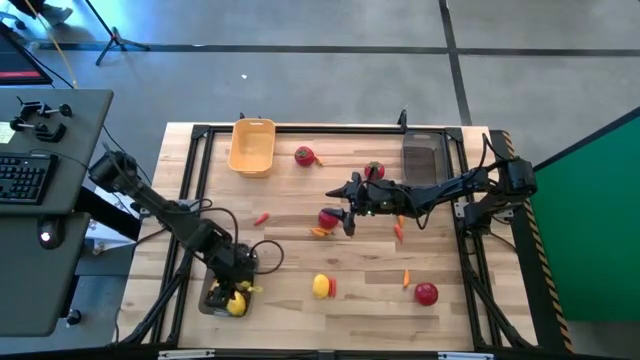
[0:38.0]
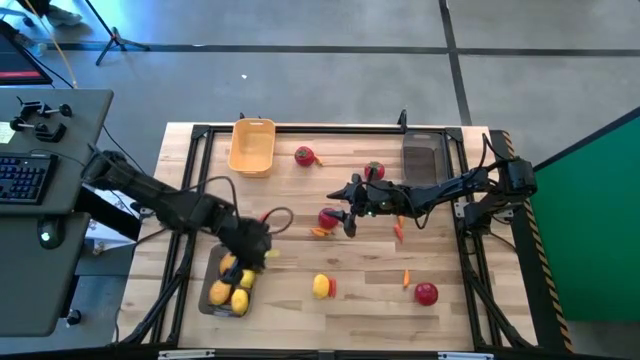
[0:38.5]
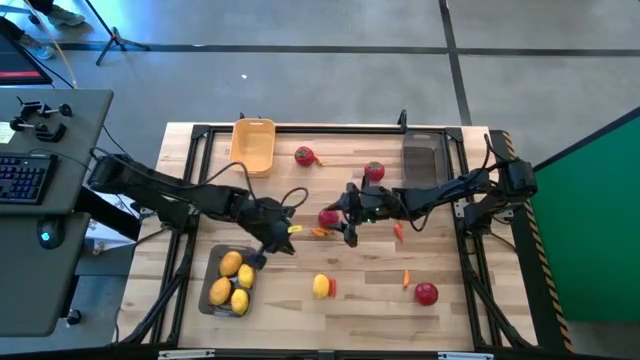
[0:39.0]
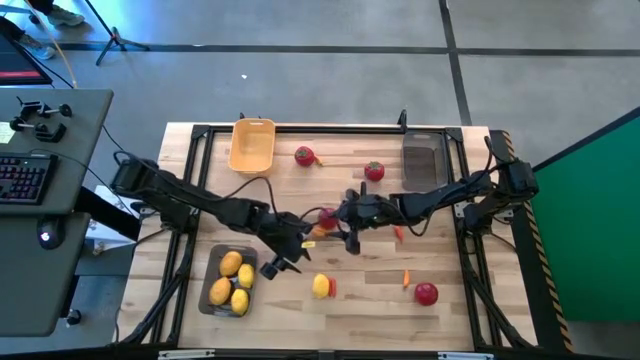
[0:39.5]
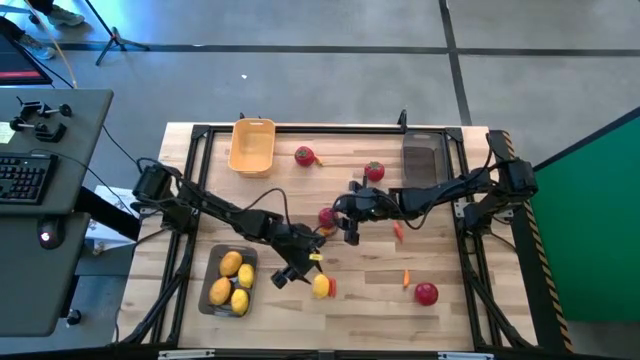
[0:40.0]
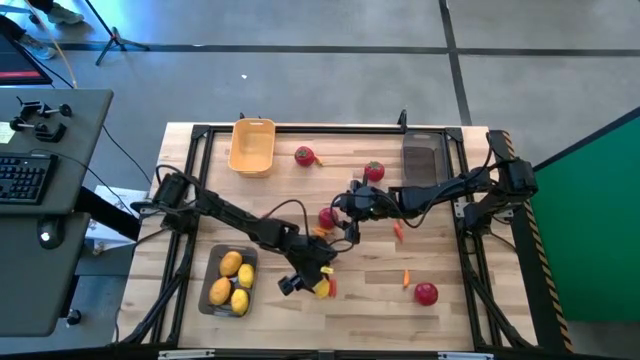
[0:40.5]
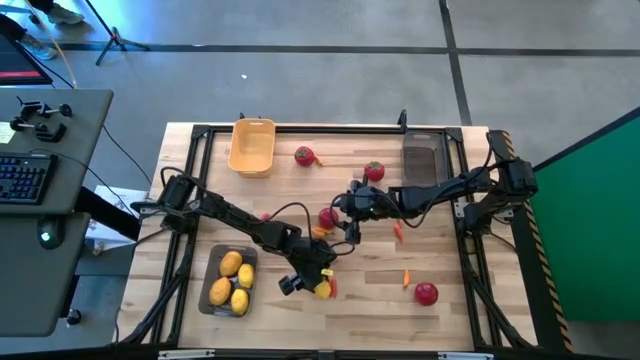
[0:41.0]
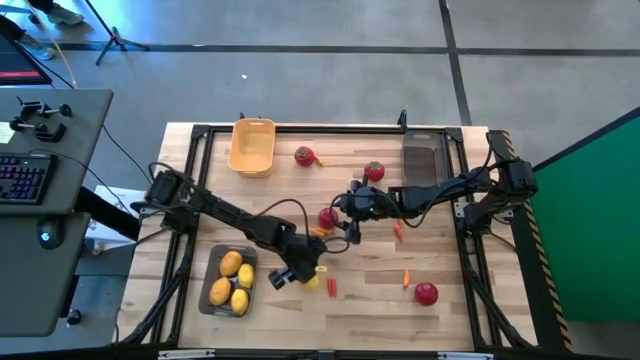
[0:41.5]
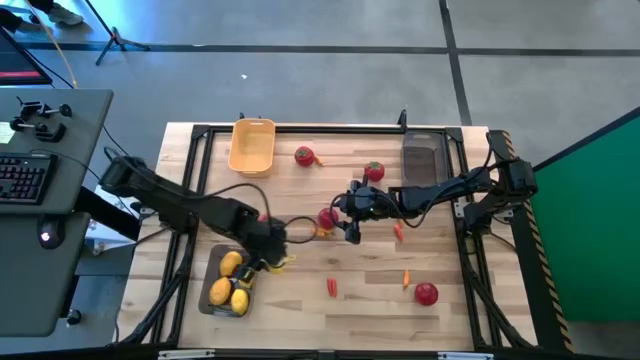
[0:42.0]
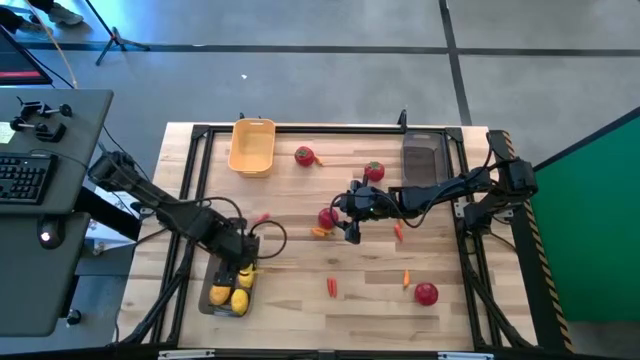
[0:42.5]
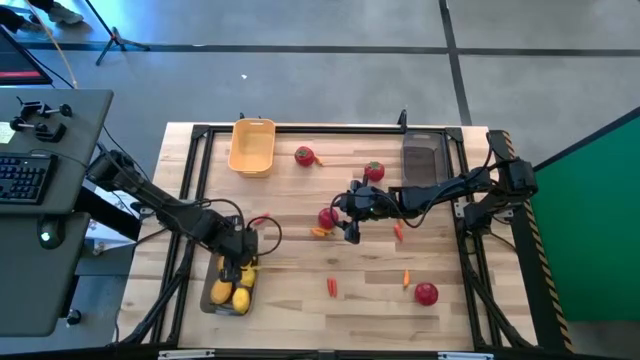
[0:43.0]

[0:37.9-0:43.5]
Task: Sort produce into baskets
Put the lemon into the bottom gray bin

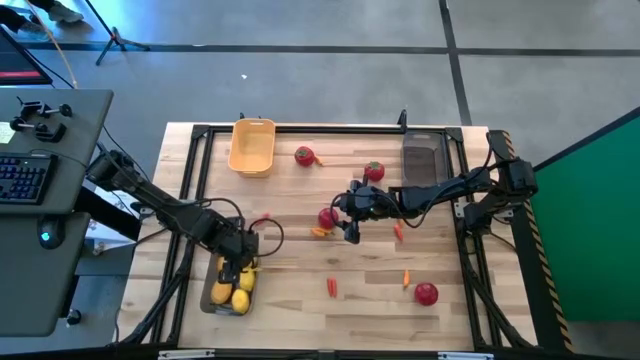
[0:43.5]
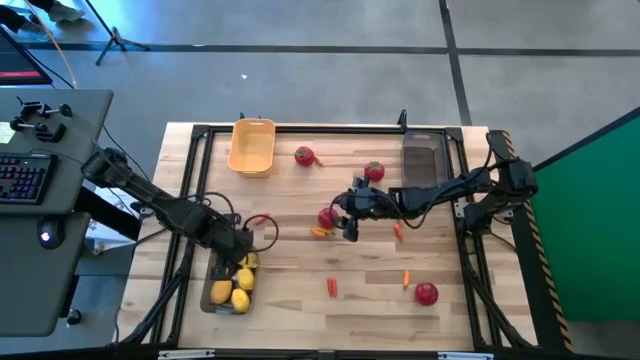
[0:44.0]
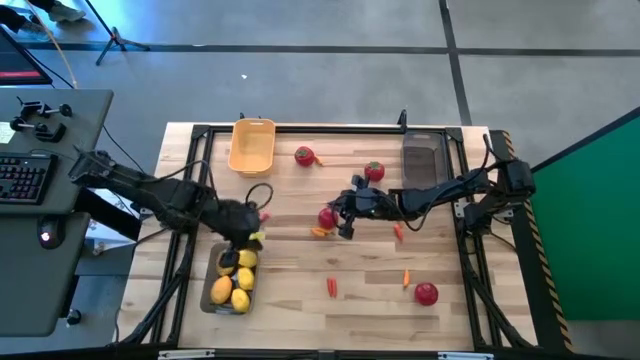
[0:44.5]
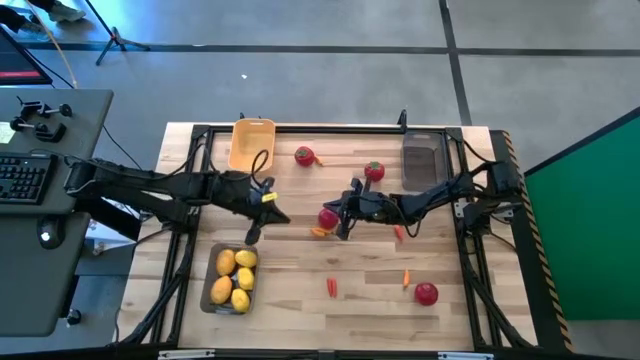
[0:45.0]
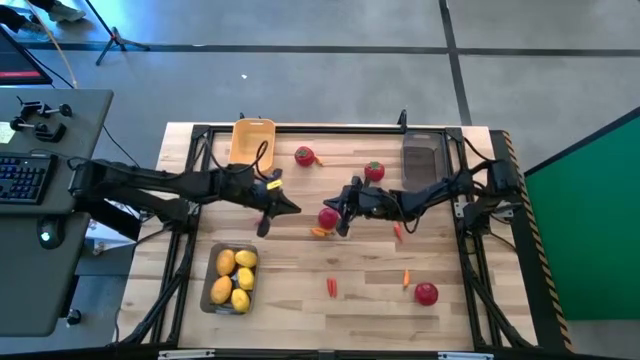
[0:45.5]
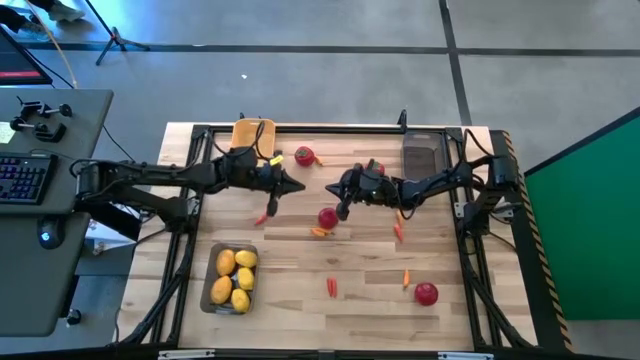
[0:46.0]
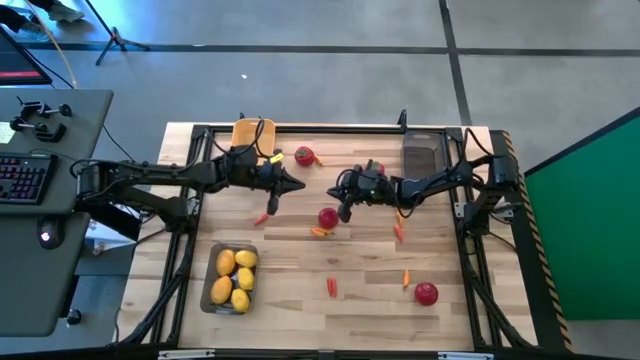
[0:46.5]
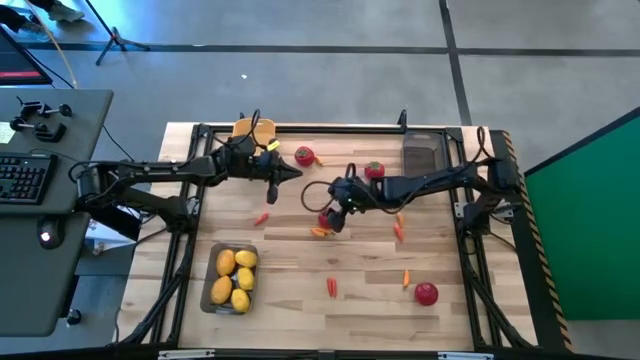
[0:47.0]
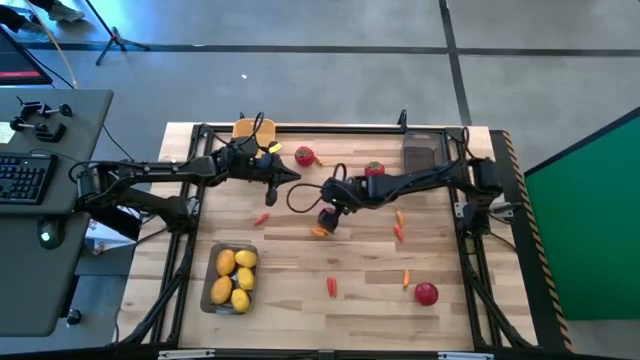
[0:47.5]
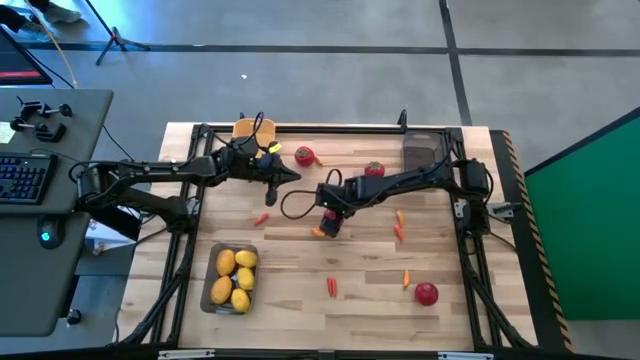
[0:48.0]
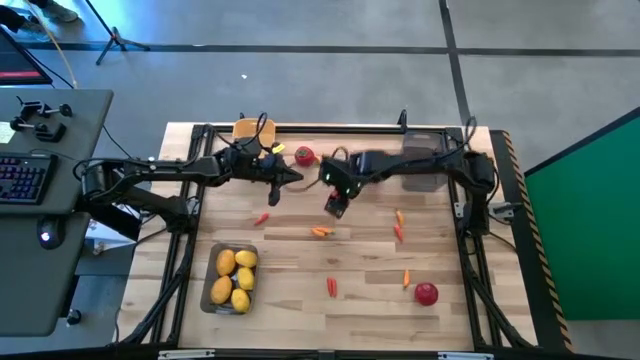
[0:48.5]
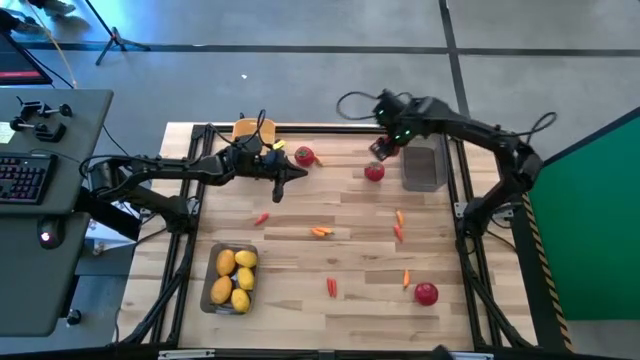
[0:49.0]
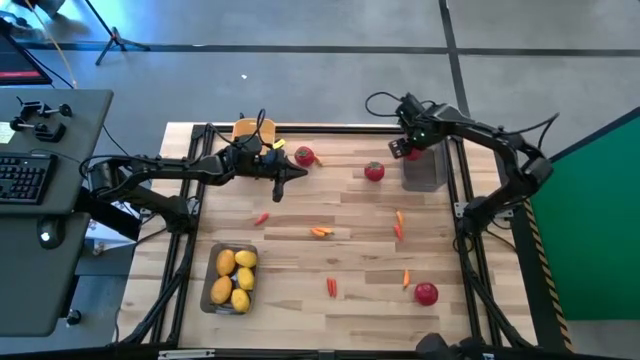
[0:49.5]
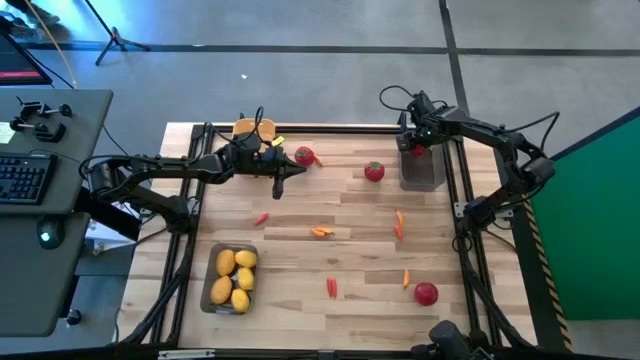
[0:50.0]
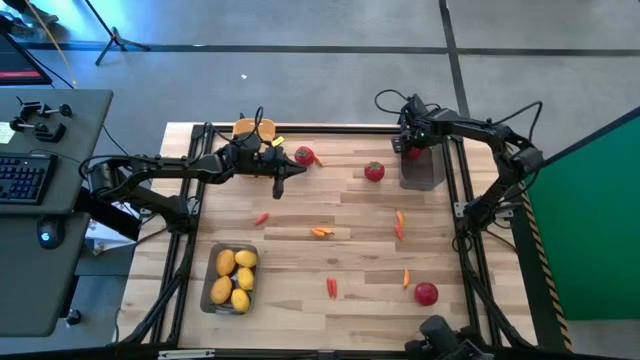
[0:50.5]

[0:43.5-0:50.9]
Put the tomato into the top gray bin

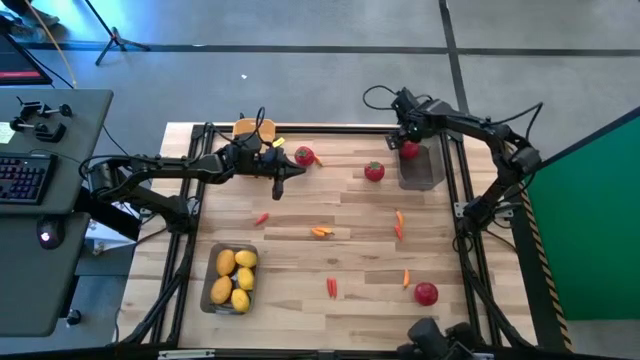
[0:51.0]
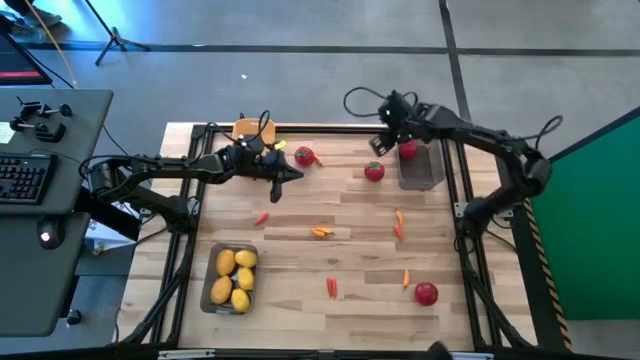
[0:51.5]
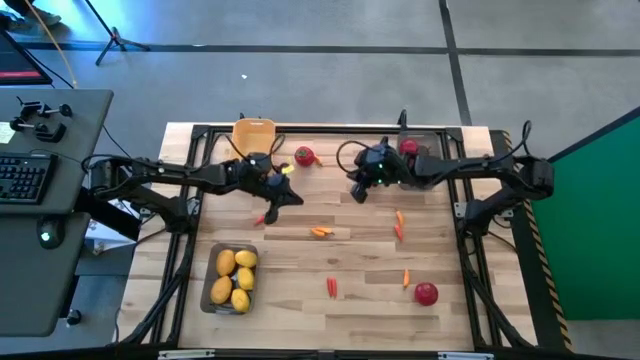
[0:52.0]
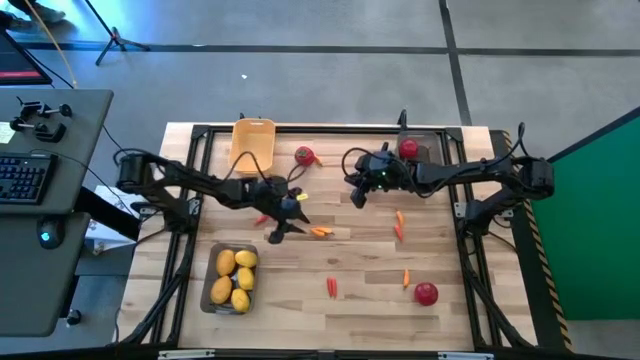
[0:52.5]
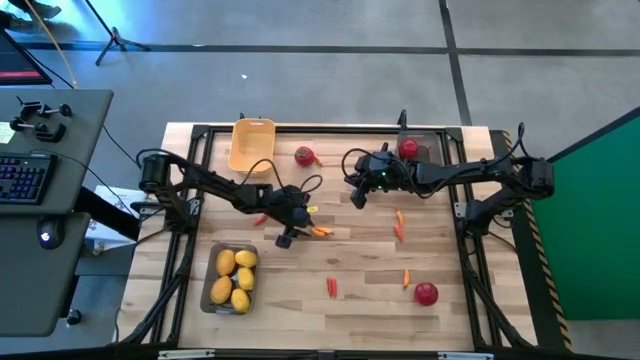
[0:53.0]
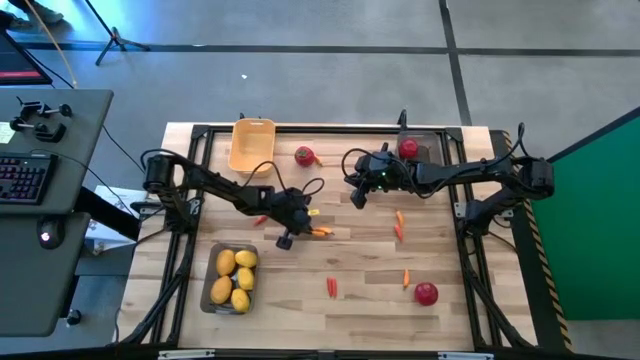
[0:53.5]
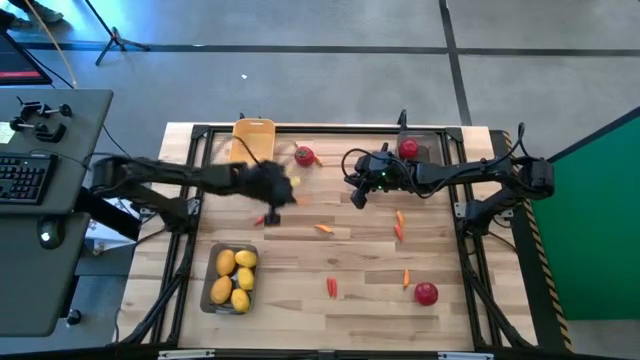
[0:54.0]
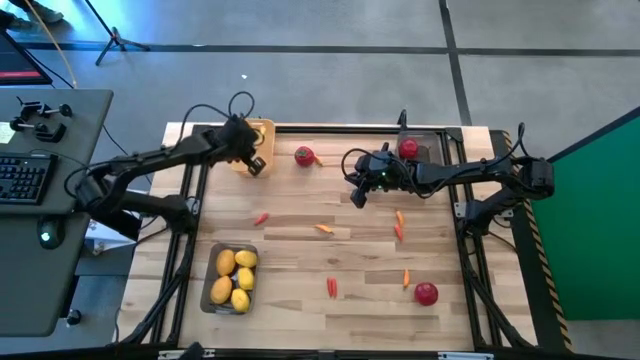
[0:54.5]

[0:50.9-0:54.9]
Put the chili pepper into the orange bin

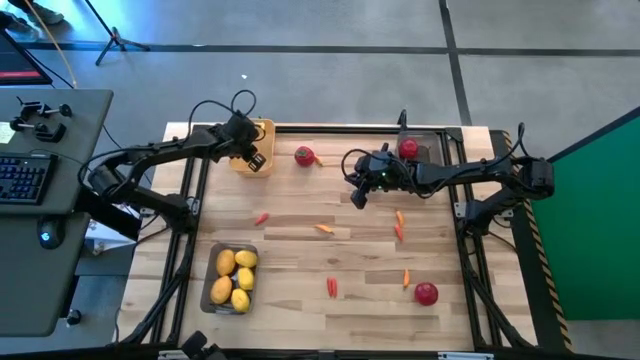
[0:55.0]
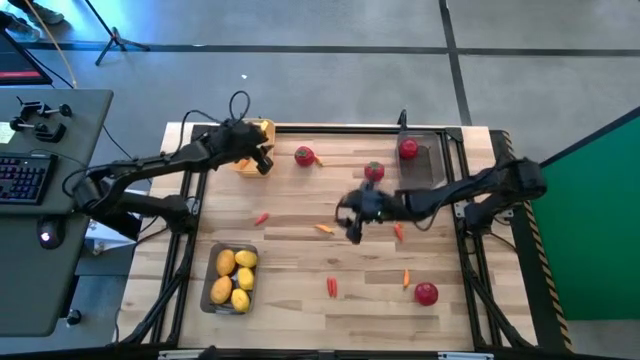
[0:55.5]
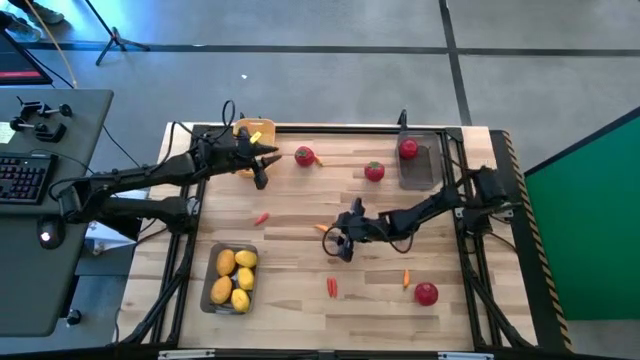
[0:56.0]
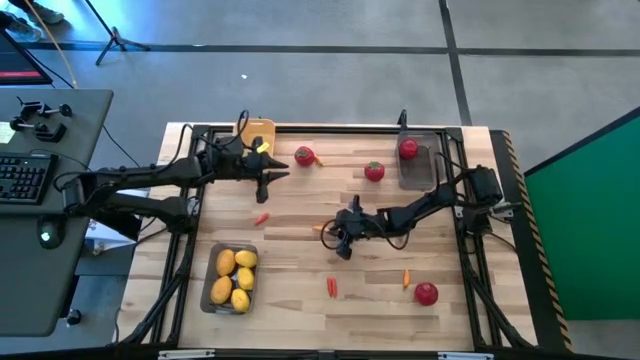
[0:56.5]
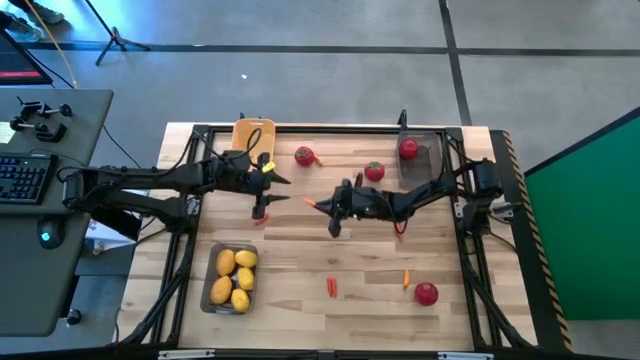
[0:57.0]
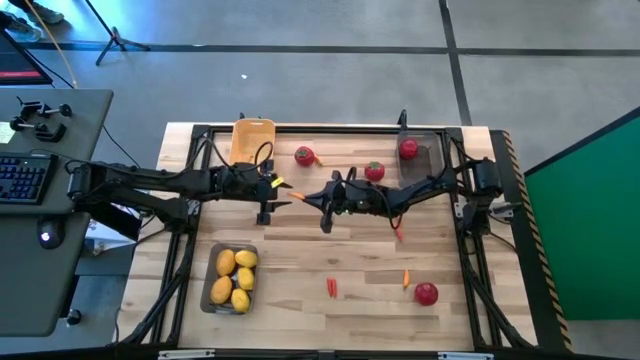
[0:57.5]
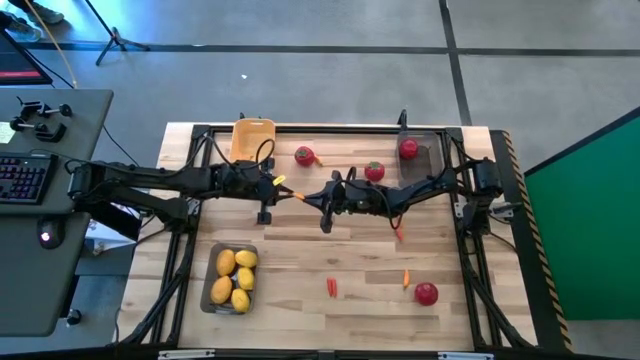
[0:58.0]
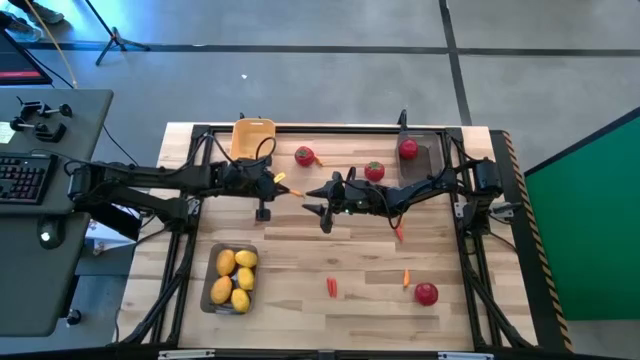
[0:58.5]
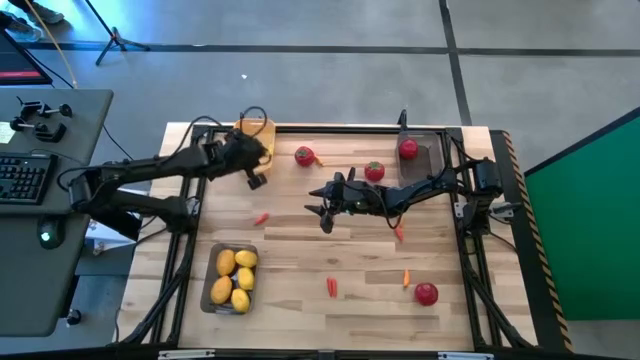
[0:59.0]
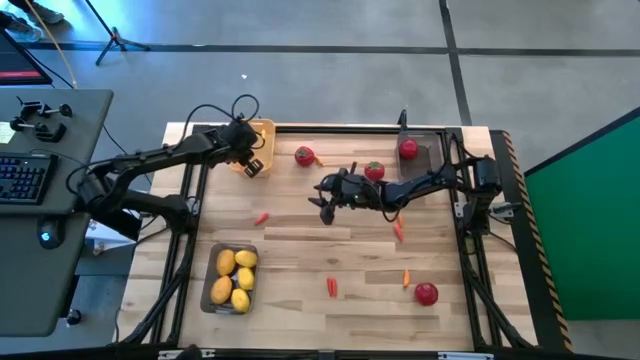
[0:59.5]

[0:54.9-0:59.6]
Put the chili pepper into the orange bin
